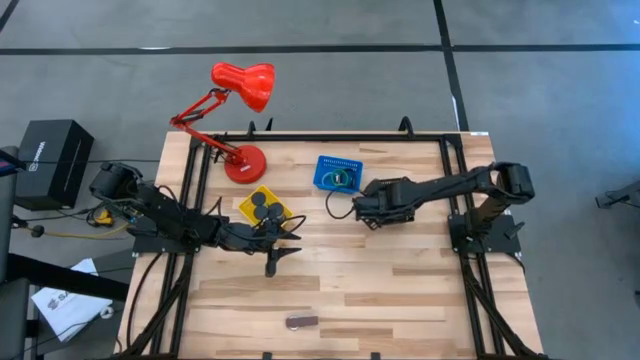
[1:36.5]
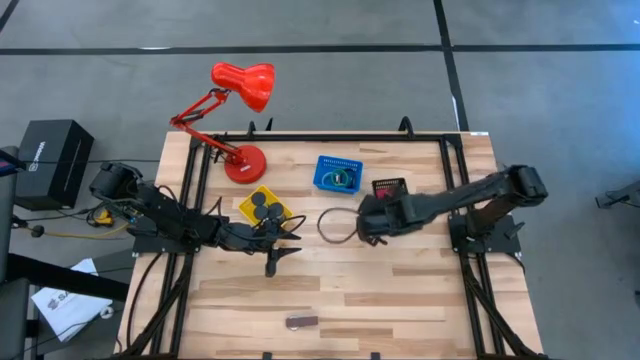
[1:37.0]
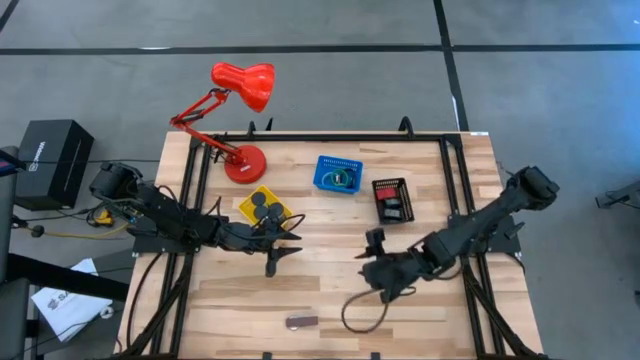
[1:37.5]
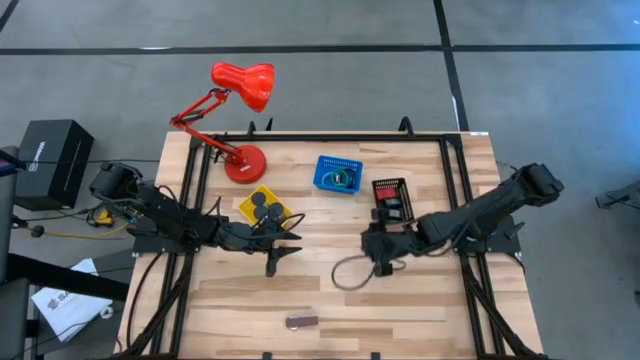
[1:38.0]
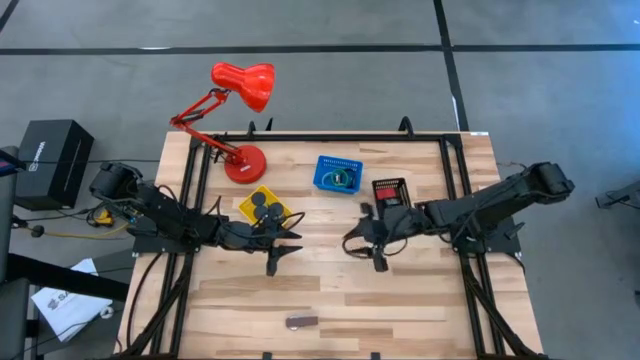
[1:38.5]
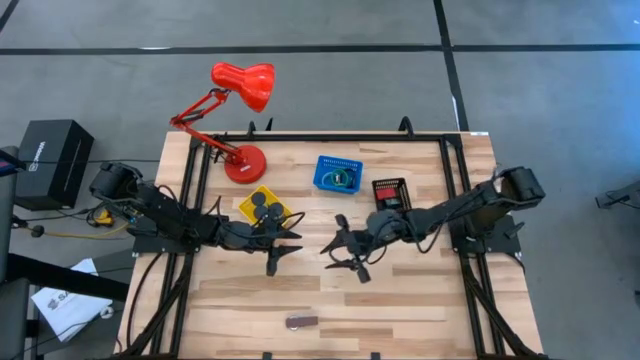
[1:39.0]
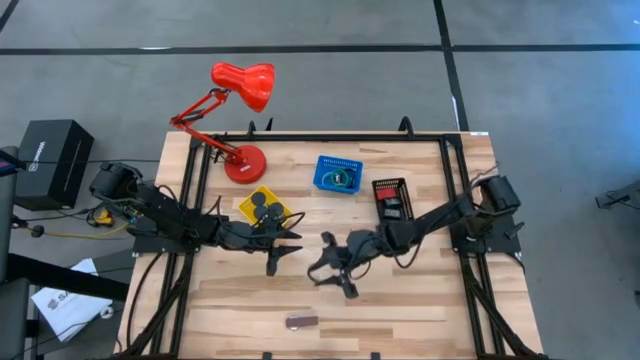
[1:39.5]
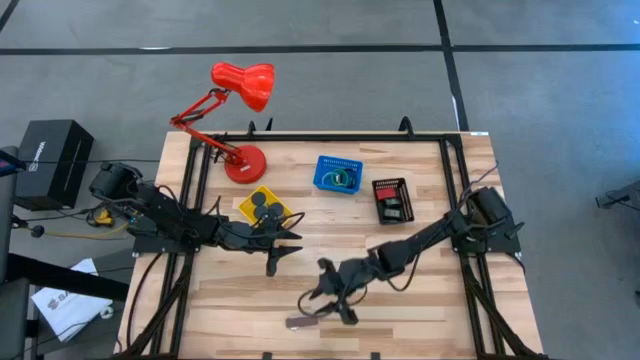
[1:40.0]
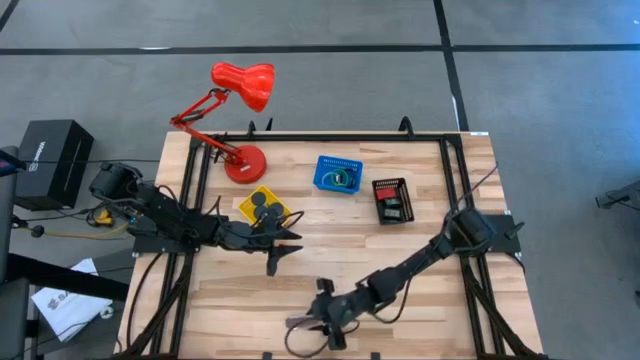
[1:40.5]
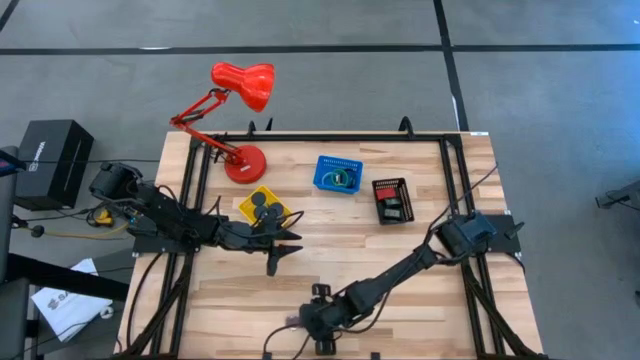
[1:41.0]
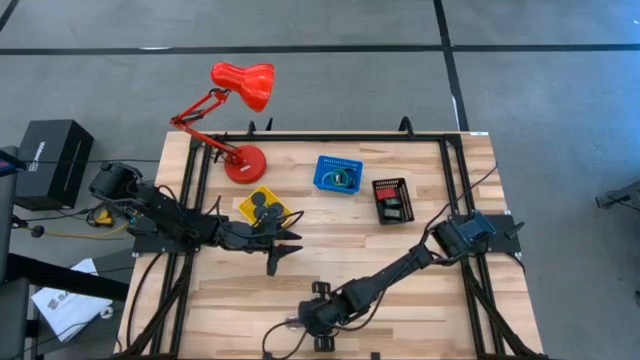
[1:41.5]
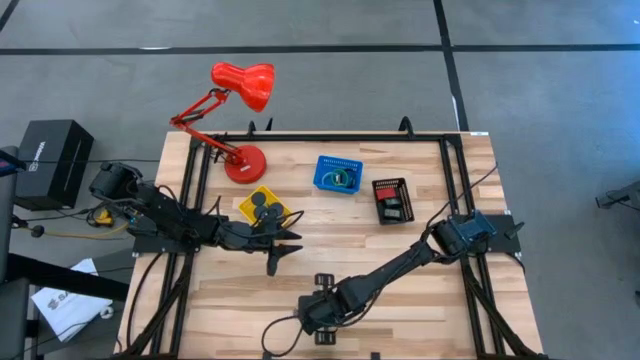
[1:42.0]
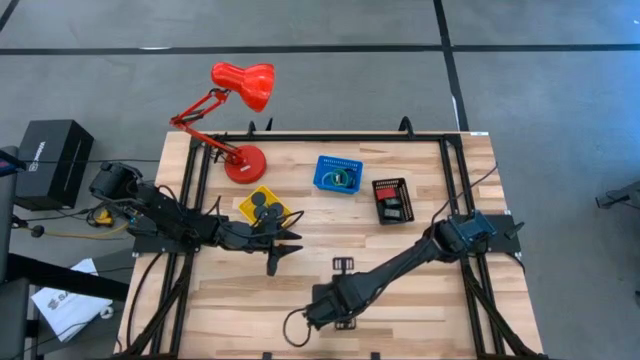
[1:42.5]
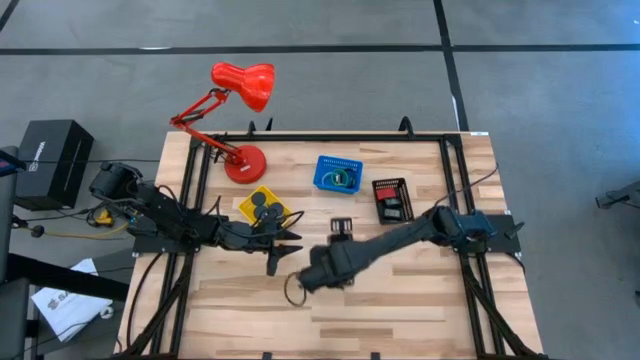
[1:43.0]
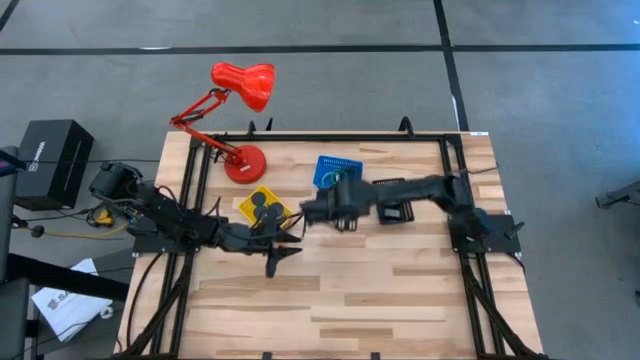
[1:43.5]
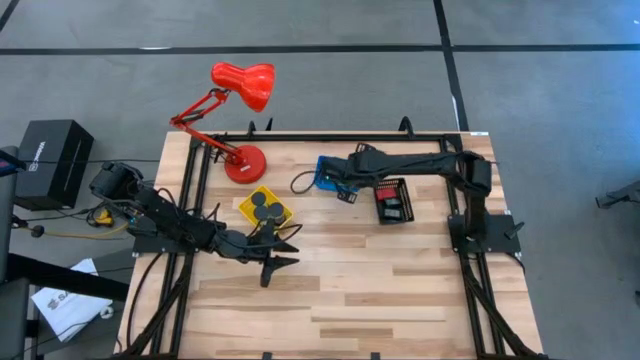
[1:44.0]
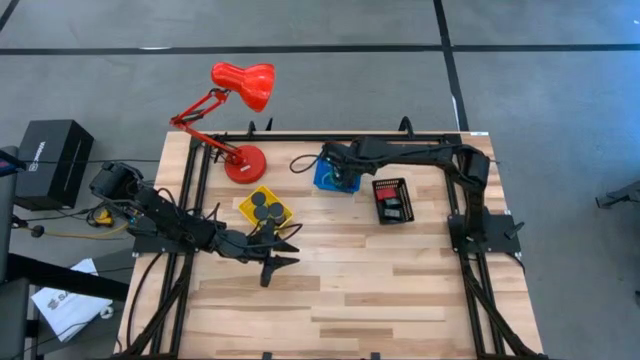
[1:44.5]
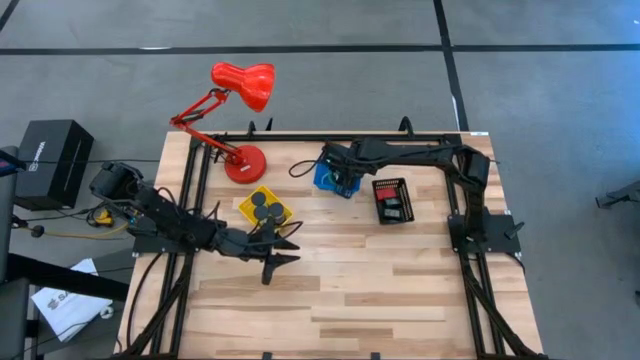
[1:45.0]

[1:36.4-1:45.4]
Task: Pick & Place Office items
Put the brown wrist watch into the blue bin

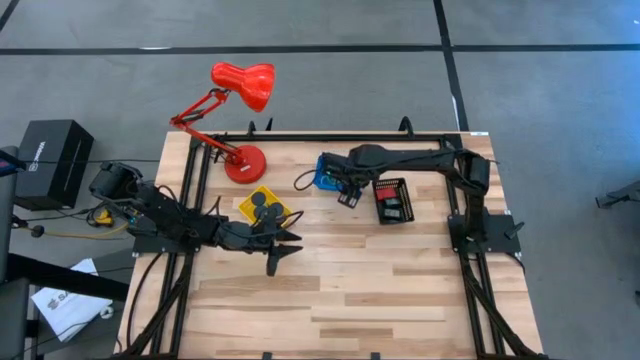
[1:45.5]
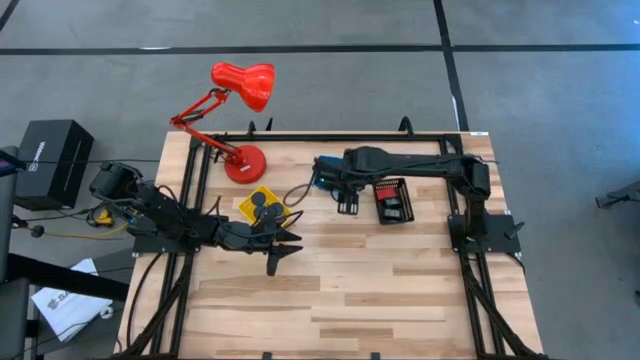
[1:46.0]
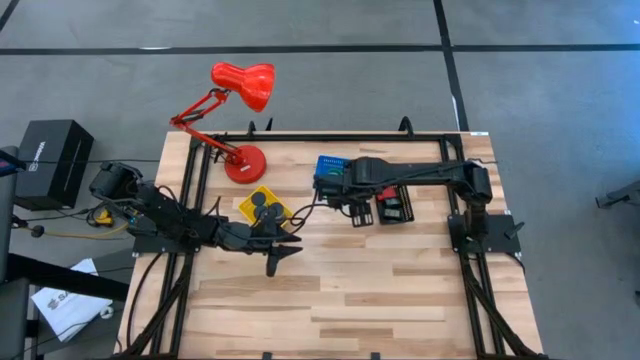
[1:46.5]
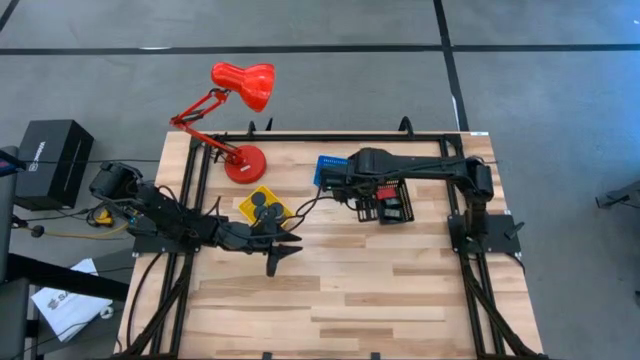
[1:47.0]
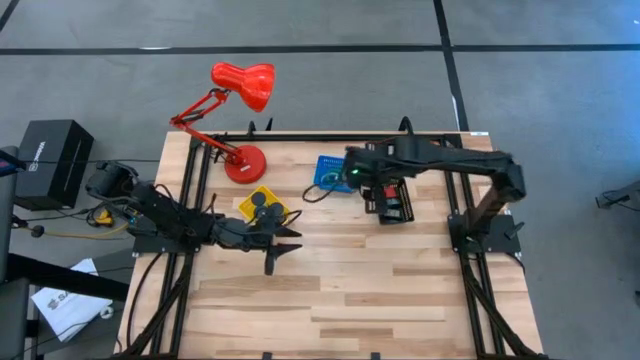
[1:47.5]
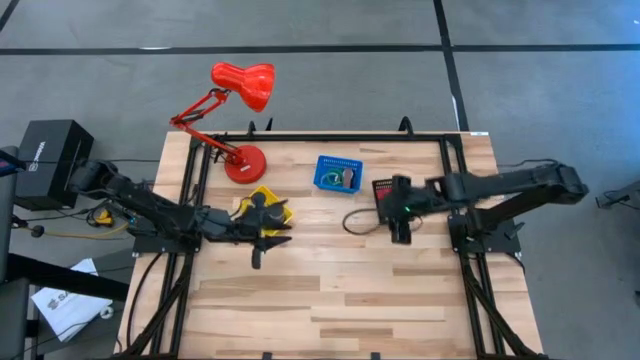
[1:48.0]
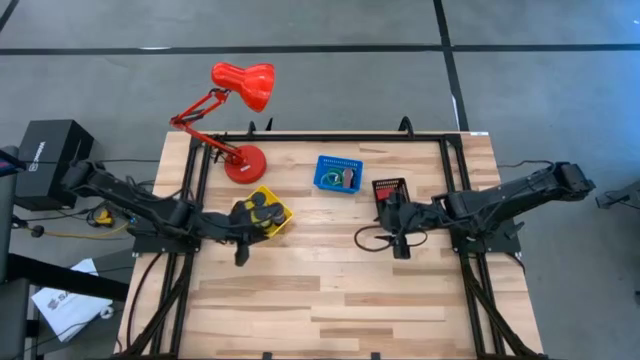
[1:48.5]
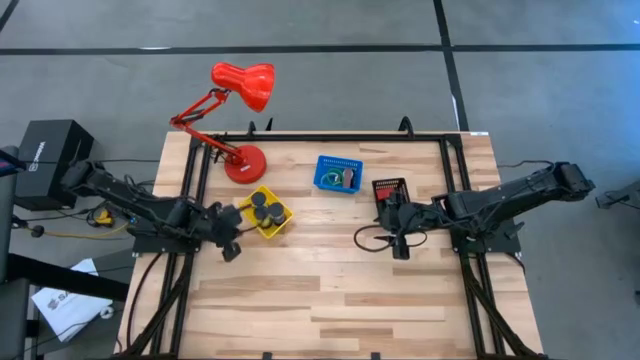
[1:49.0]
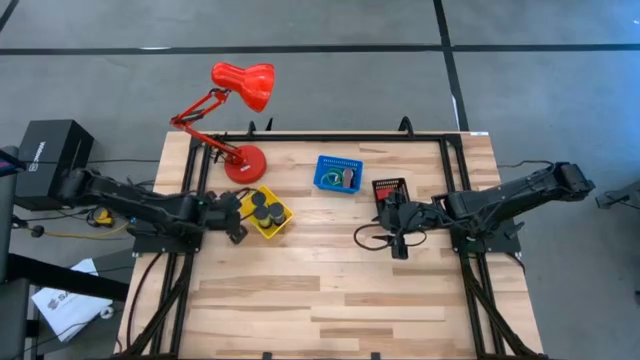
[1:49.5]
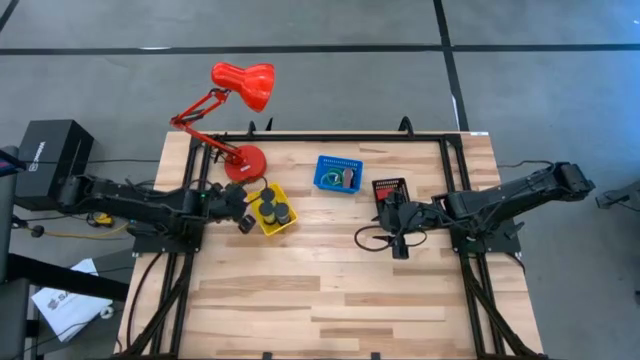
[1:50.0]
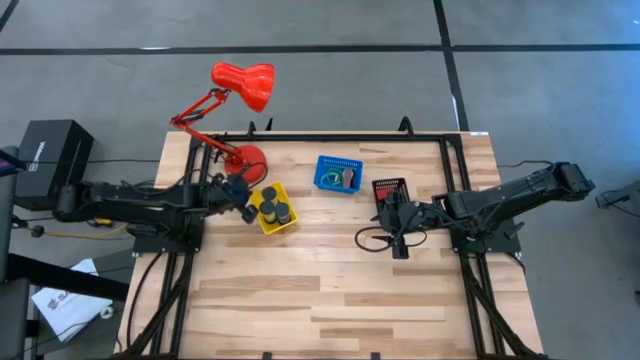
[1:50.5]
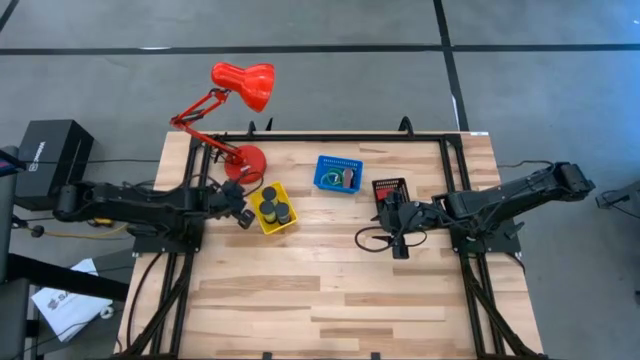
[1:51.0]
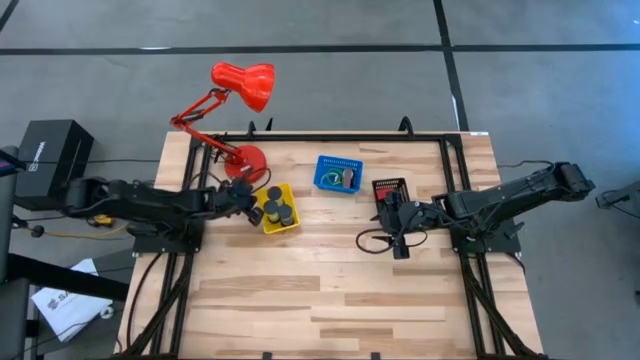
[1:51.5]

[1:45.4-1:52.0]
Adjust the yellow bin on the table

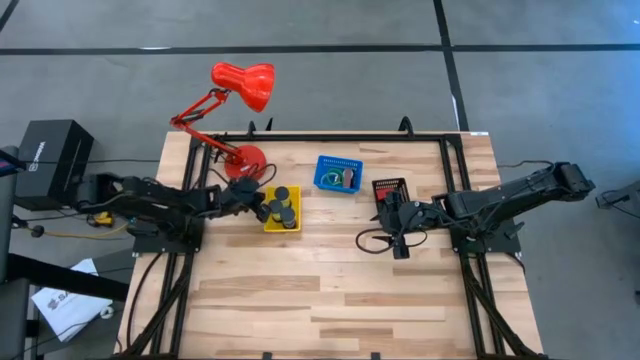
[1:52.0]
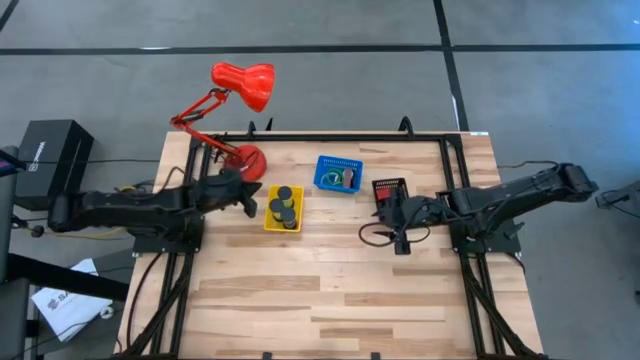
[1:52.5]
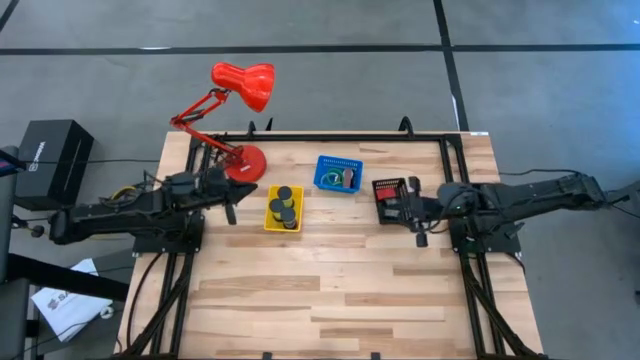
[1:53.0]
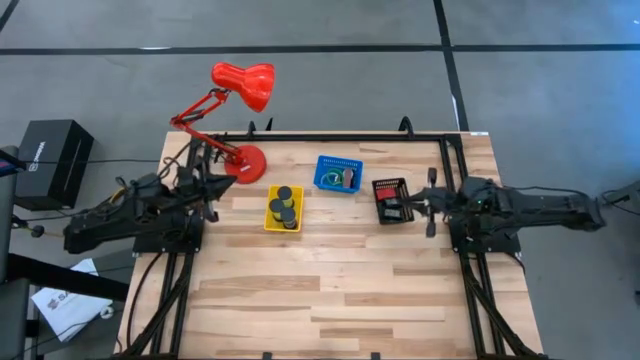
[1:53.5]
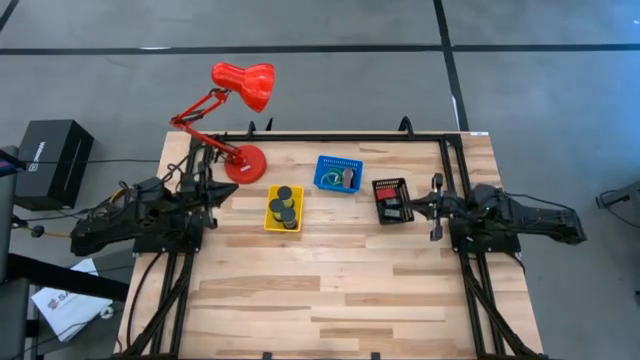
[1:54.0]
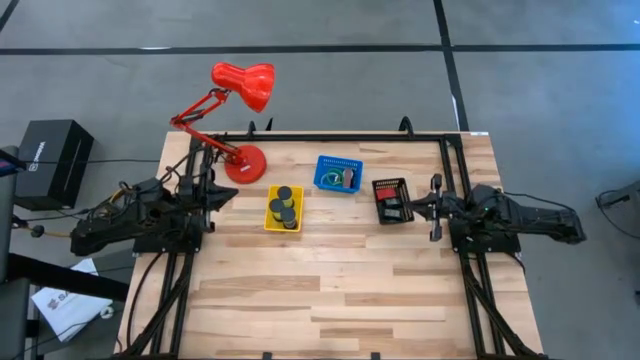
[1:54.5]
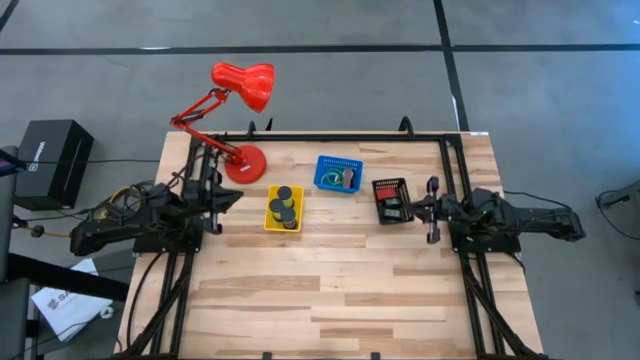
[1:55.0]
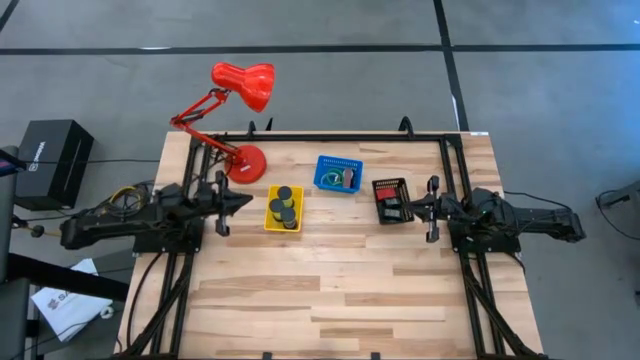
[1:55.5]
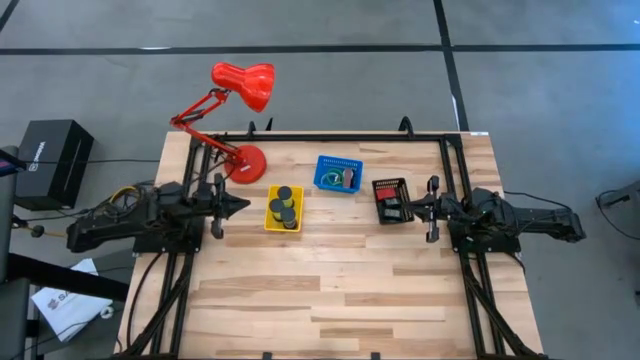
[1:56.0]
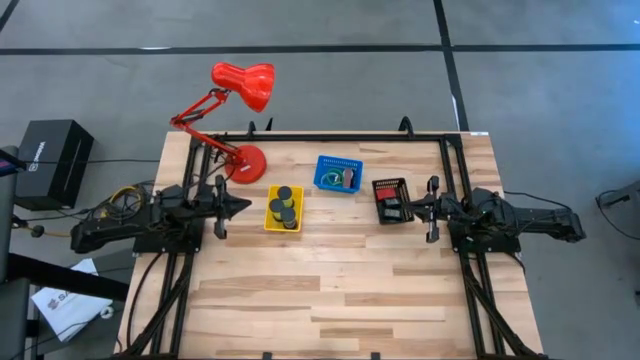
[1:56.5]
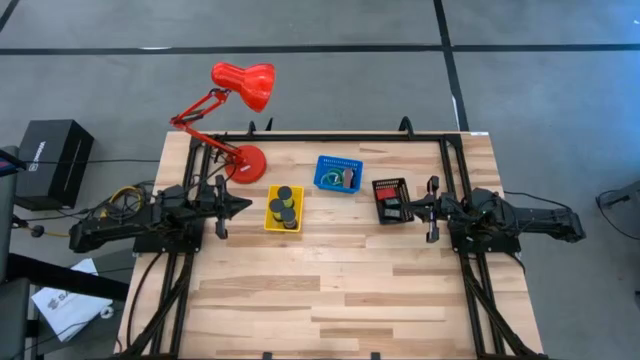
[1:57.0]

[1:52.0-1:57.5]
Return to Home Position

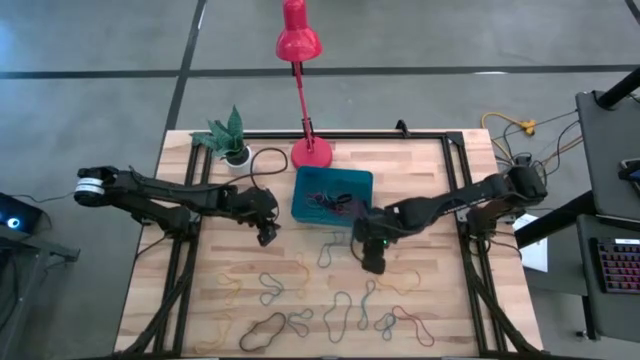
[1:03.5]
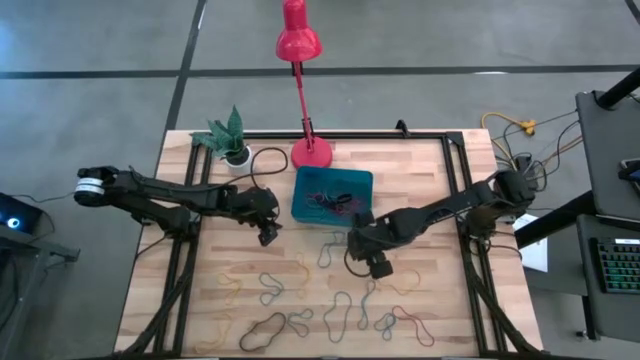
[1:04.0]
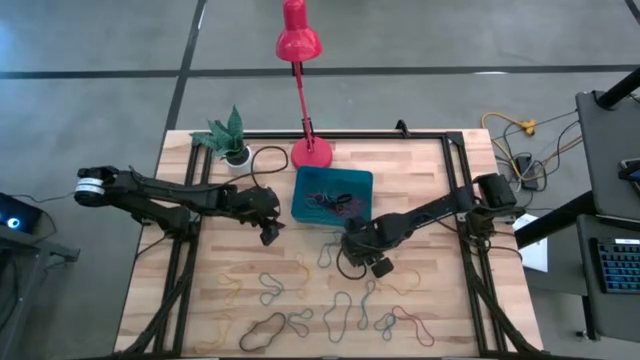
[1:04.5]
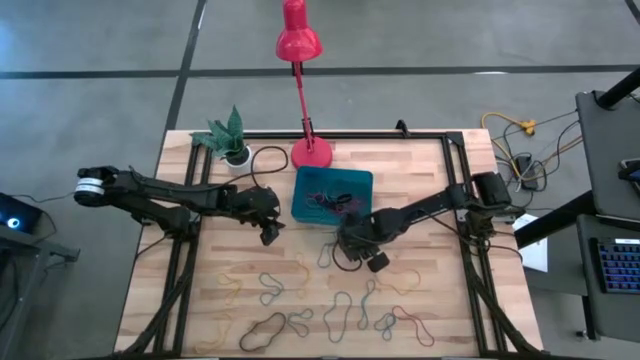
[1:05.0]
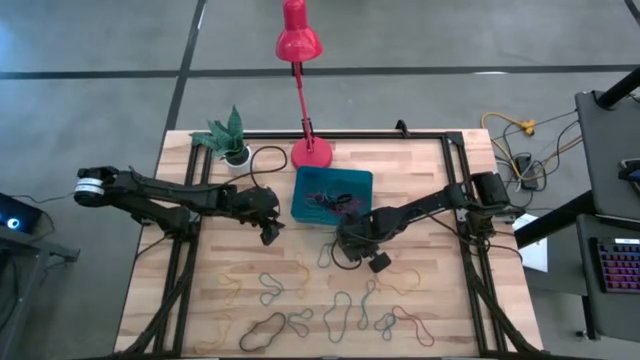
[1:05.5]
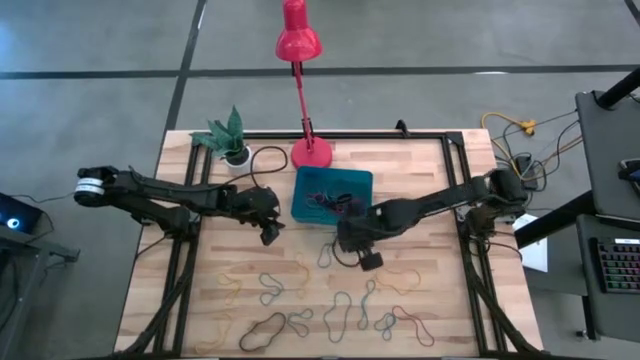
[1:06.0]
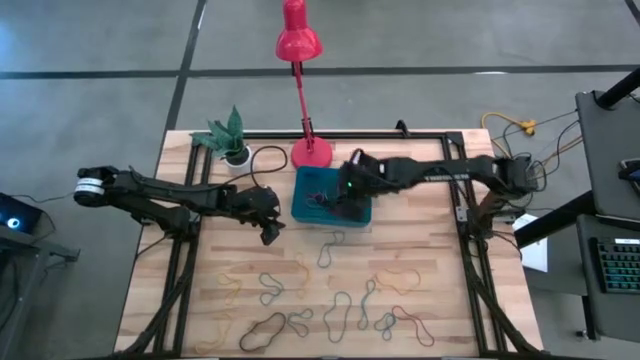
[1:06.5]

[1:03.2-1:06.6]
Task: Pick and place rubber bands into bin
Put the yellow rubber band into the blue bin
